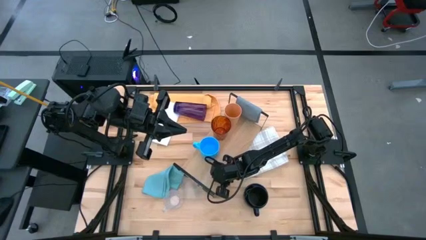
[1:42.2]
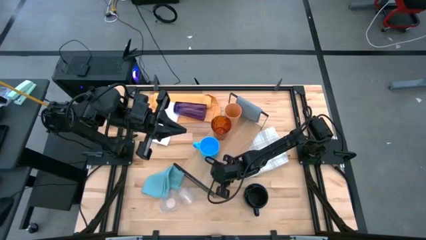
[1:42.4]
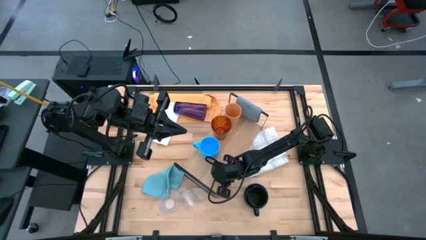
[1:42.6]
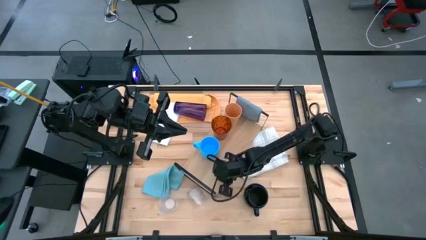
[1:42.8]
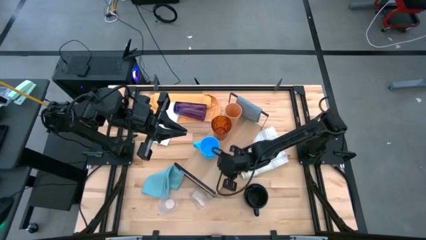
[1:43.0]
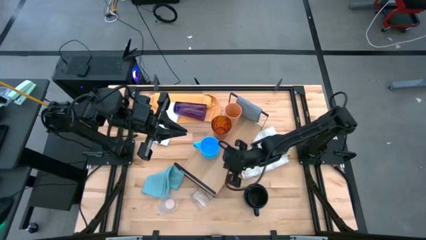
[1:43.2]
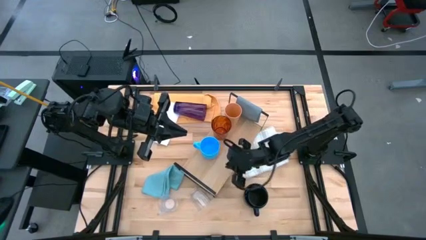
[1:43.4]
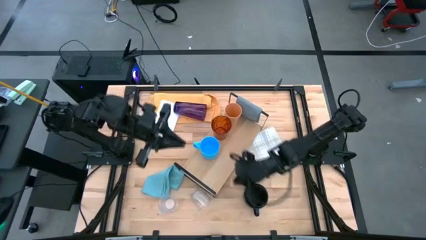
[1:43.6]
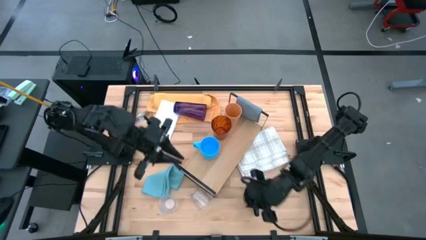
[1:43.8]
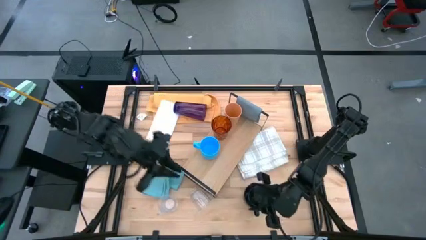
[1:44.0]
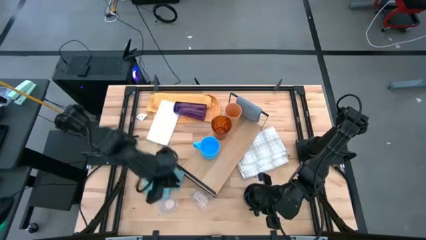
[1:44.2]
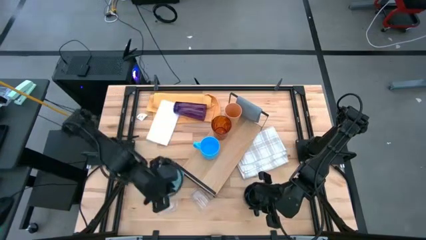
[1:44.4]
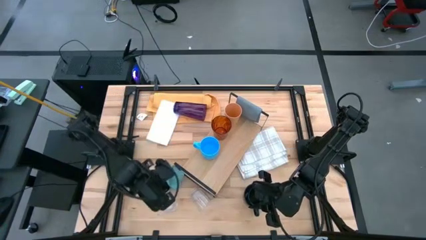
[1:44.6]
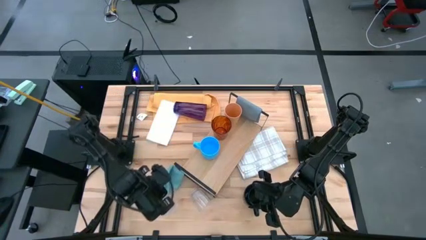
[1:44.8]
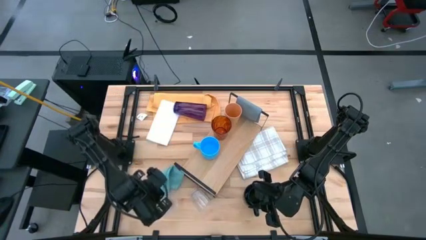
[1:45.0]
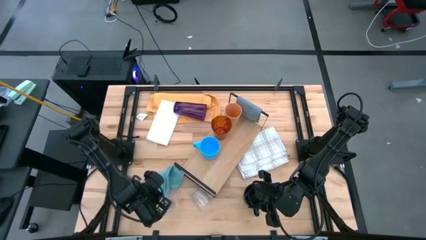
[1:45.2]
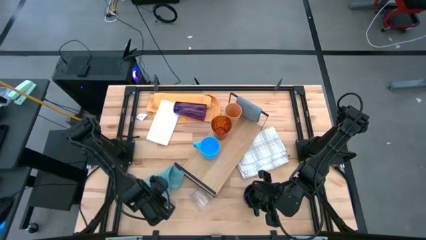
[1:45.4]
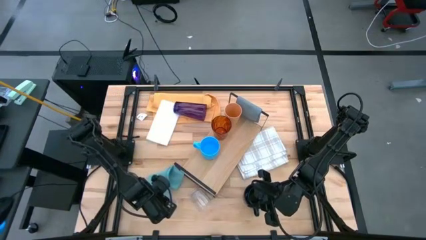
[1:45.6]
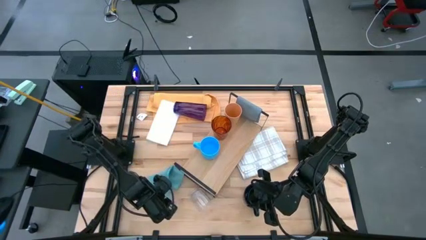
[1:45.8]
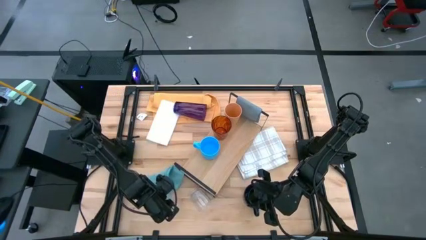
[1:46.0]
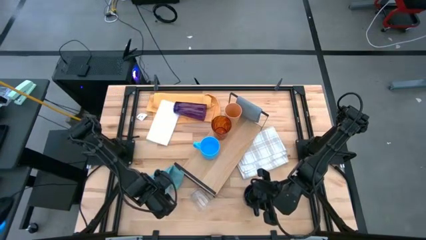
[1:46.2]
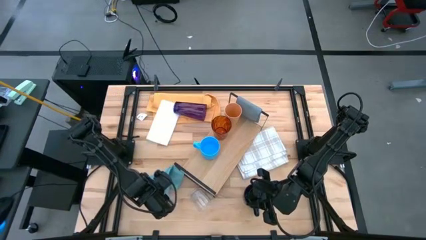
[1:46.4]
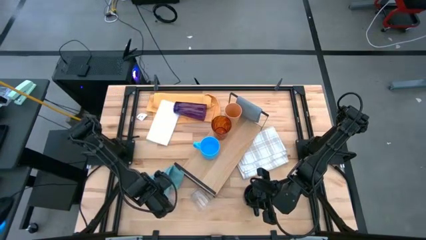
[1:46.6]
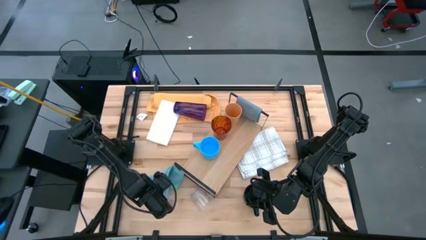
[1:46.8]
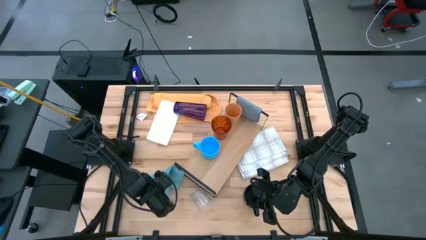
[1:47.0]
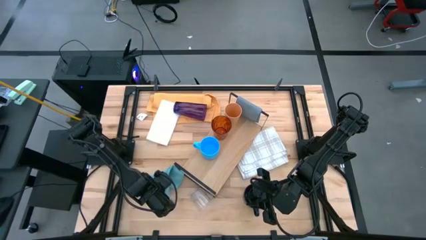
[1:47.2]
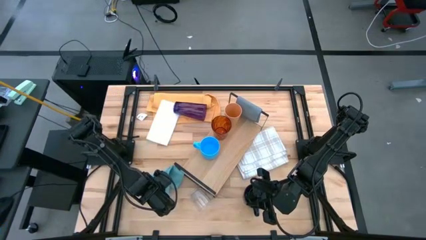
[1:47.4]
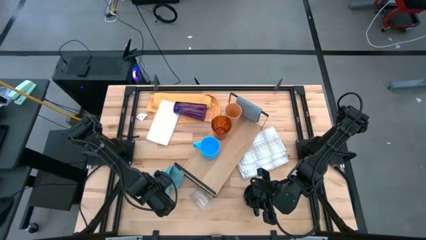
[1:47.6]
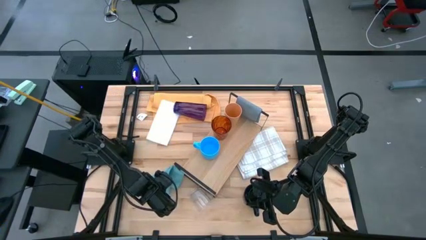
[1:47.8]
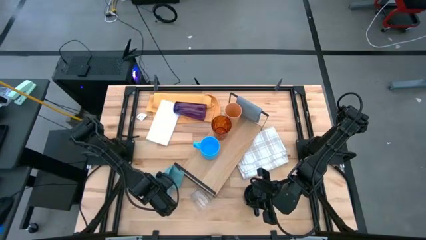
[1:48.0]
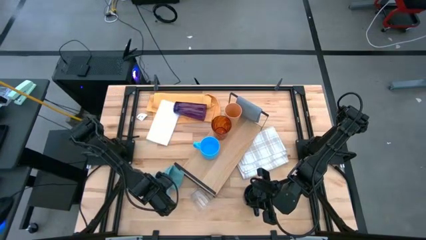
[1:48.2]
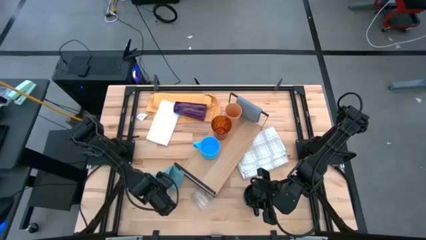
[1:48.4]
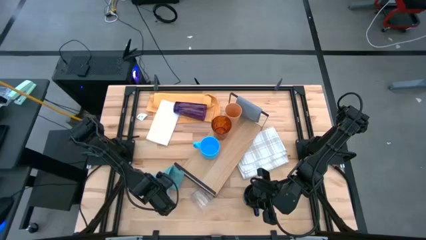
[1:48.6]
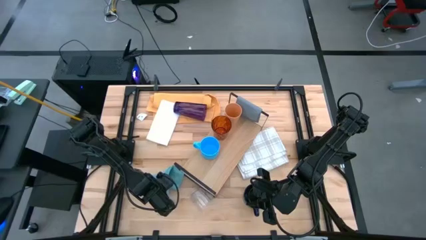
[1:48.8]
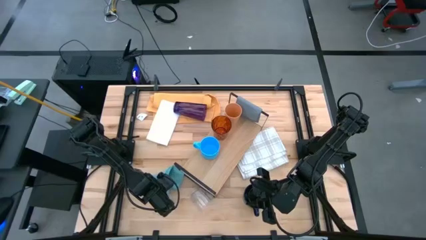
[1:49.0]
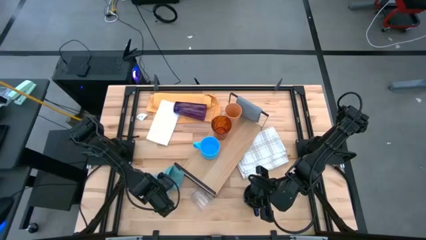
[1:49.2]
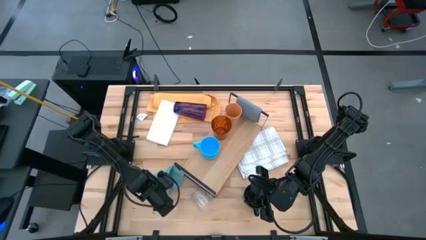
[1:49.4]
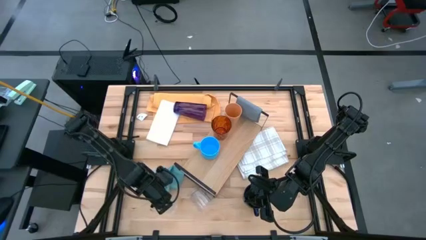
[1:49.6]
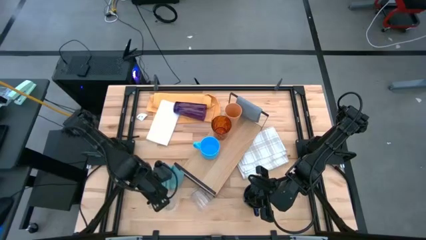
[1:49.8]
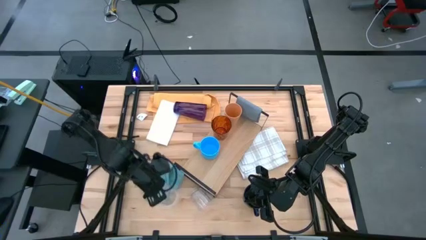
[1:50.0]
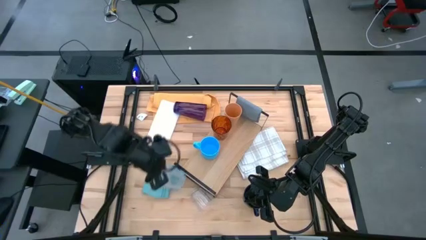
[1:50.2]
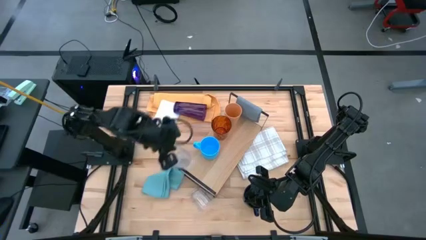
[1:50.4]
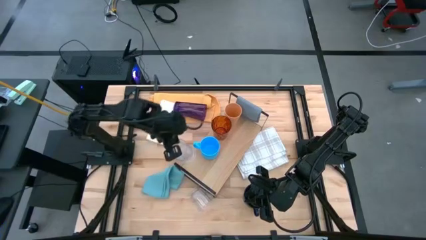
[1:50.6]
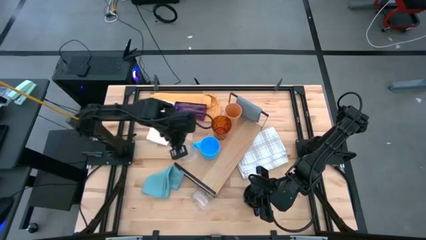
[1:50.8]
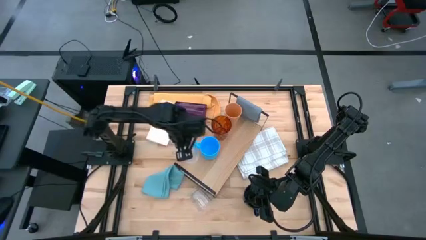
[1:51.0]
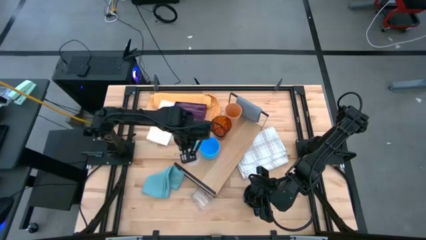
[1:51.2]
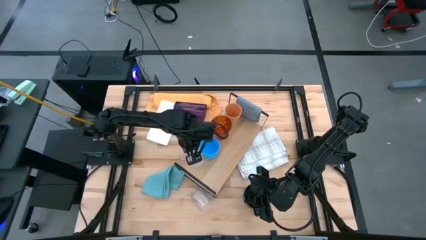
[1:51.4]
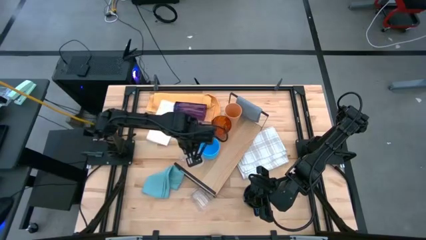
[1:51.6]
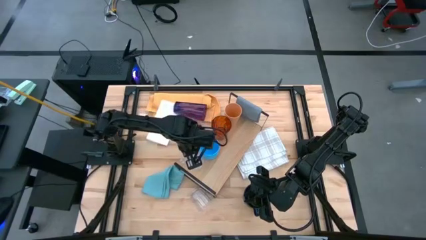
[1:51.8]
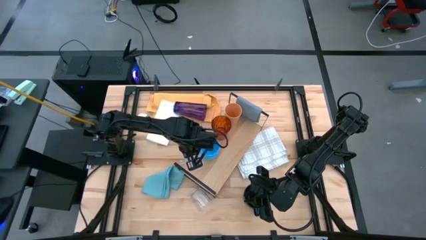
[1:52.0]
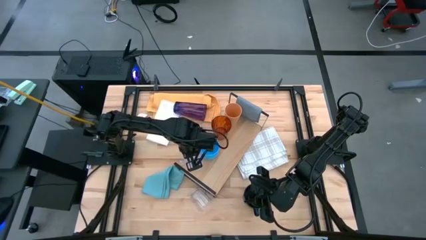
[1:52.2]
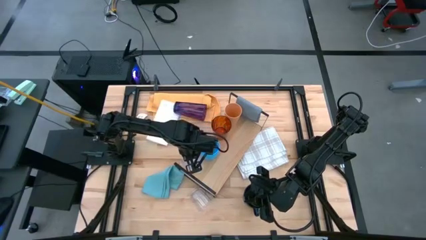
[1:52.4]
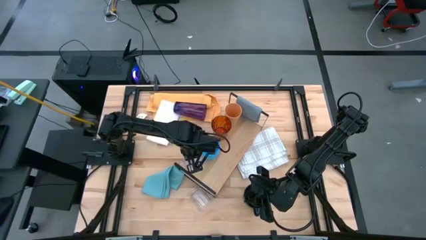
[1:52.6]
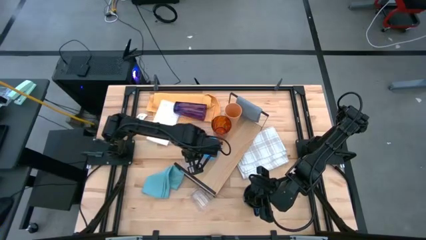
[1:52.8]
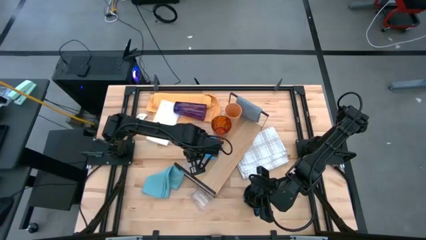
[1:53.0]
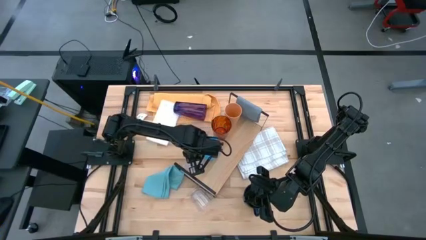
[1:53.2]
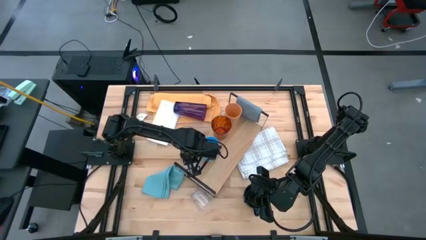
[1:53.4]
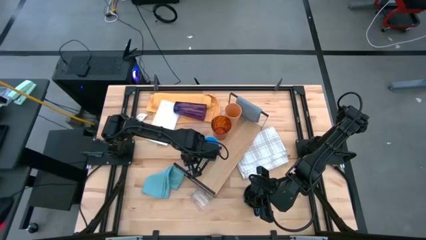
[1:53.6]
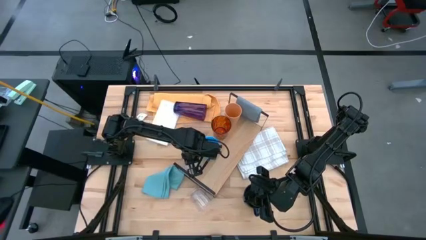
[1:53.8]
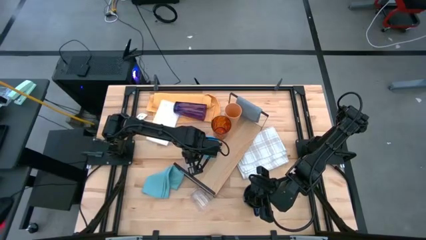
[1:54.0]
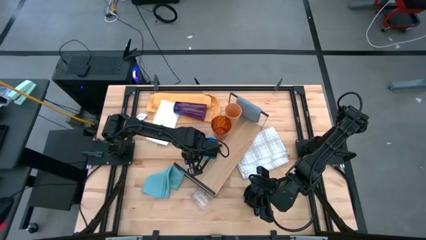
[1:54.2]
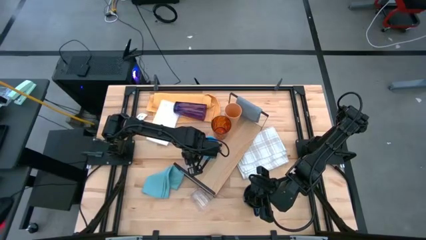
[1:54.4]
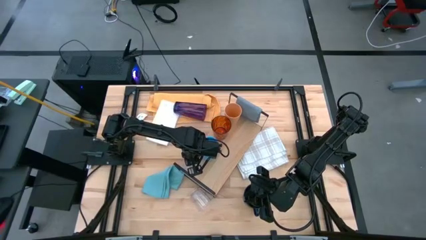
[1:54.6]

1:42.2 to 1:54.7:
Task: Stack small to large cups/mugs on shelf
Put the left transparent mug on the shelf
